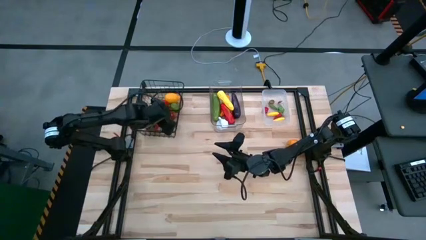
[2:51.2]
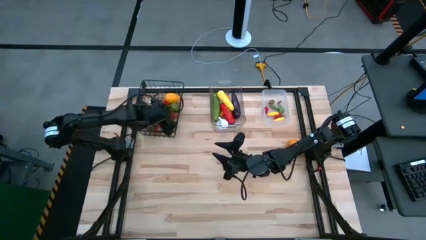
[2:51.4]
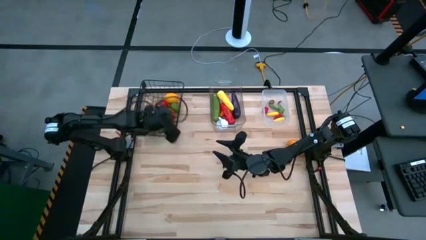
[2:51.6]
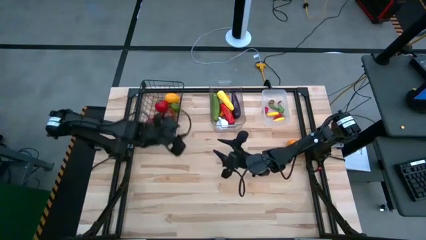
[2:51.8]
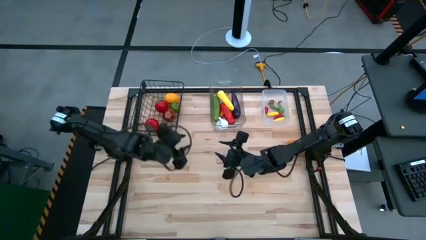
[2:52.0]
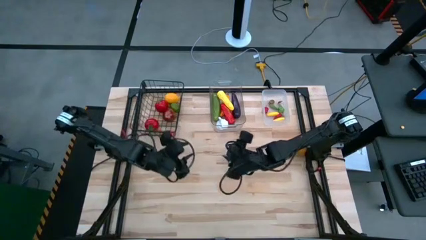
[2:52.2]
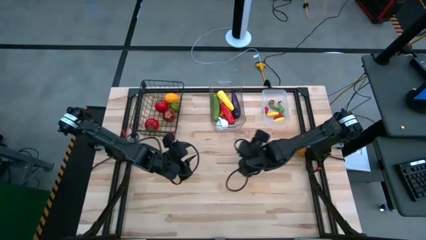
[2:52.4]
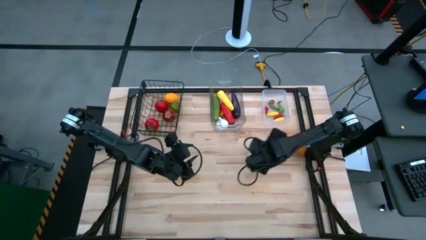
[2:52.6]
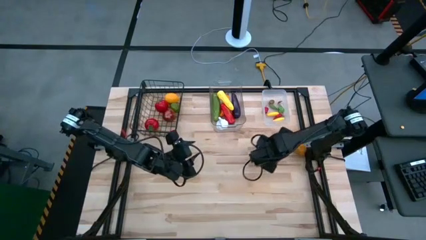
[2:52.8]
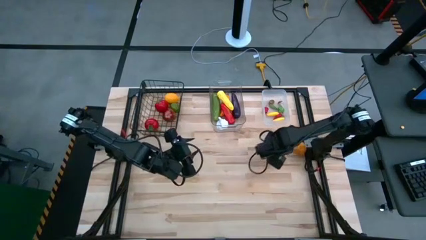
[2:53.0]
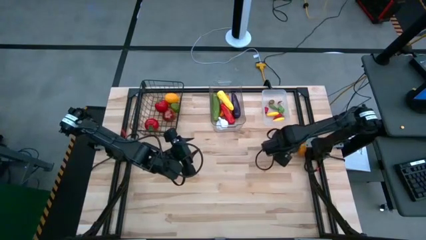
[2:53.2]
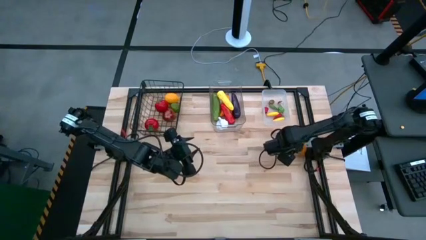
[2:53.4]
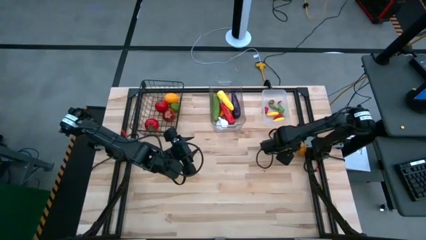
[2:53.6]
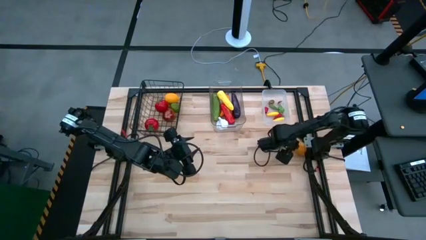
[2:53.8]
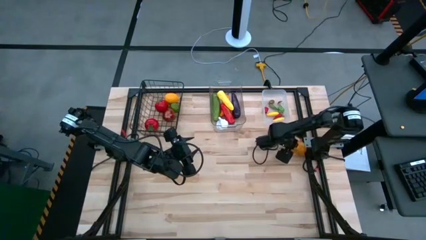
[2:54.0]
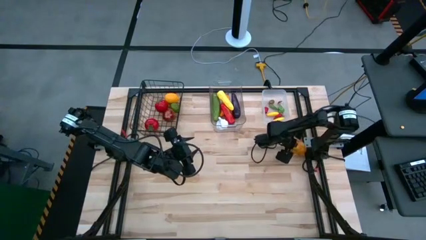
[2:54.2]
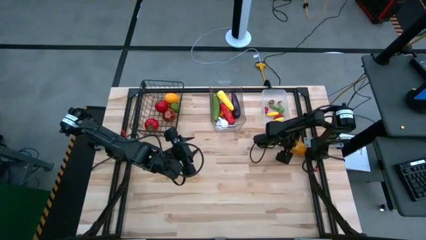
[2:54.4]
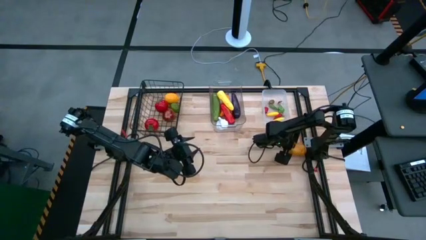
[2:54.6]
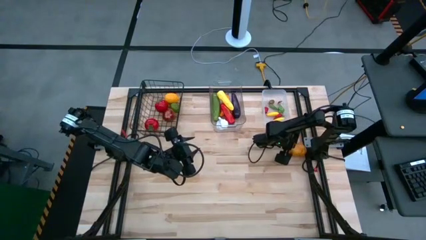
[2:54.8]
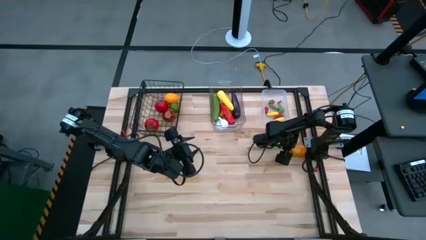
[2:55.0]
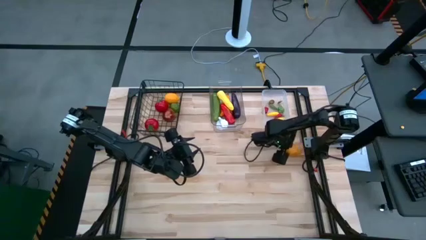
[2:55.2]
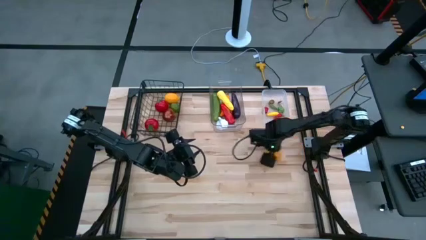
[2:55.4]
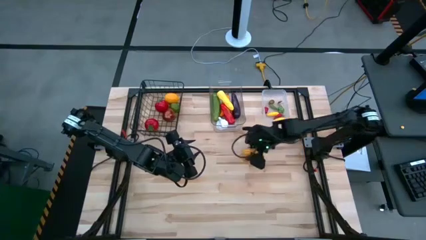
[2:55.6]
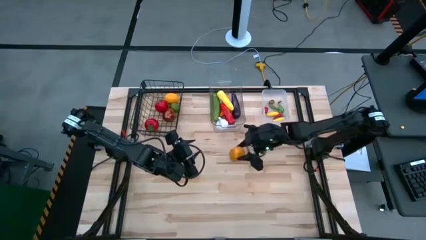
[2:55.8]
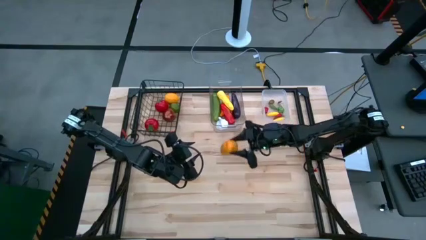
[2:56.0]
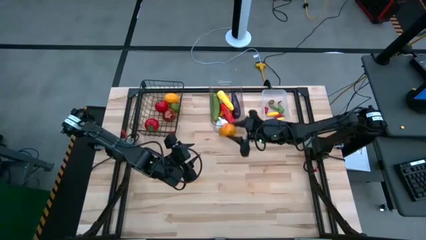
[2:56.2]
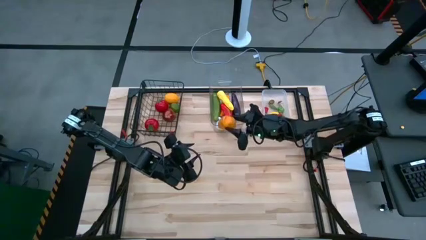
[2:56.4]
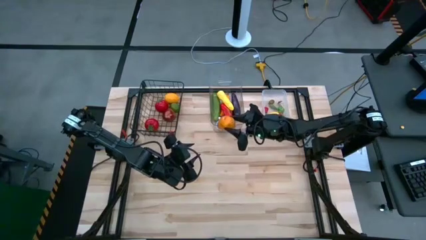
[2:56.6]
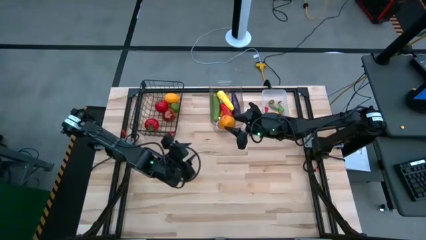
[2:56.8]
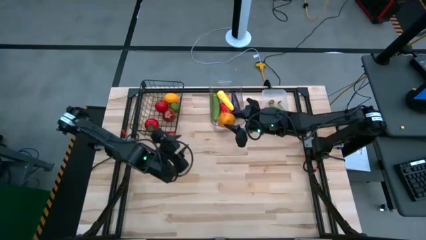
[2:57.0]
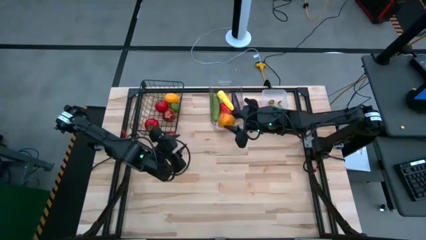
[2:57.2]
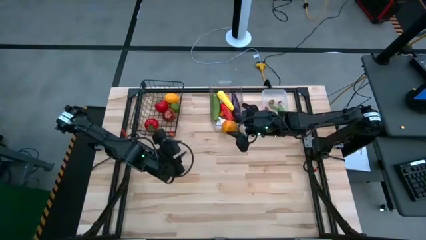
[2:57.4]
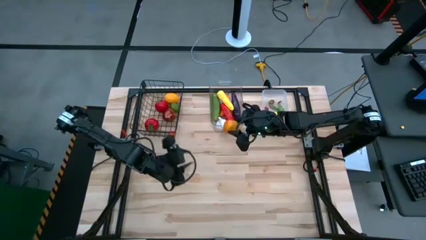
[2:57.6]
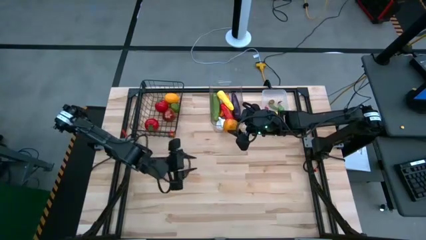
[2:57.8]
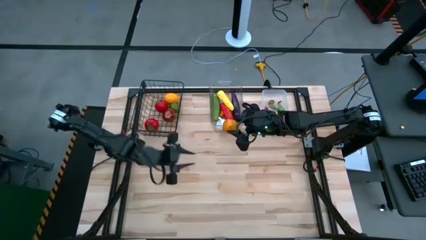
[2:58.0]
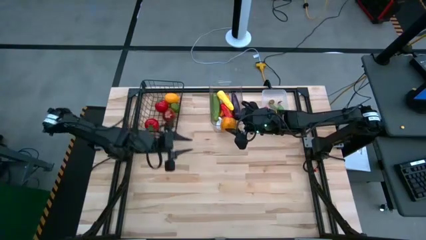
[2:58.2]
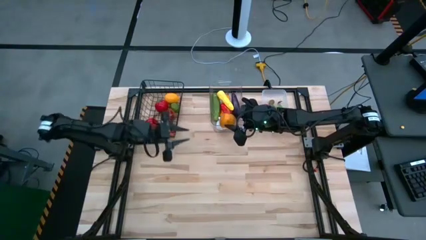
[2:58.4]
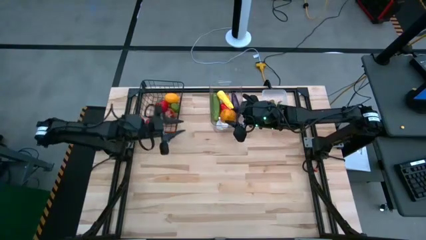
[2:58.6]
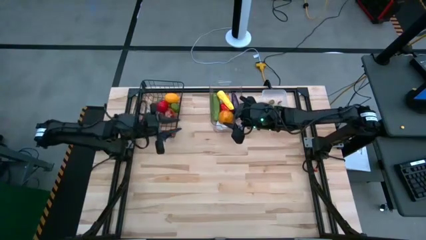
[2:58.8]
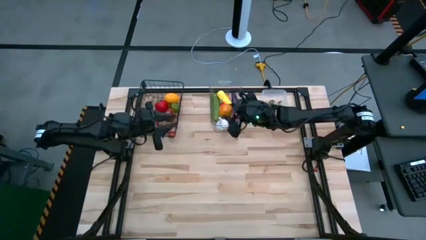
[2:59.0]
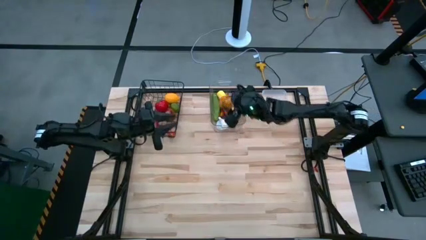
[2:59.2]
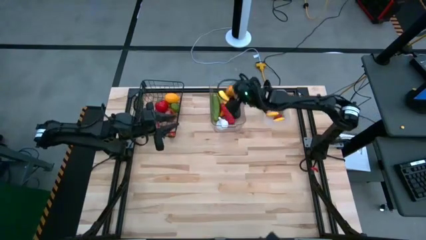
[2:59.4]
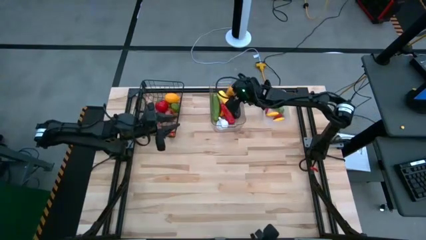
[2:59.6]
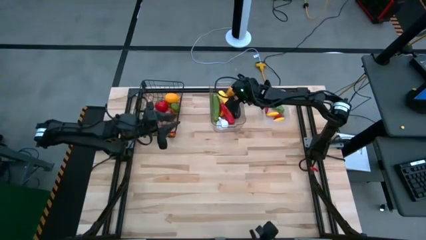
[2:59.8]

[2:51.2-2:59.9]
Task: Sort produce into baskets
Put the brown potato into the left transparent bin

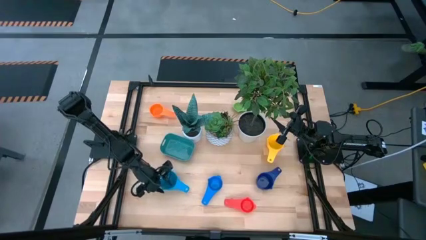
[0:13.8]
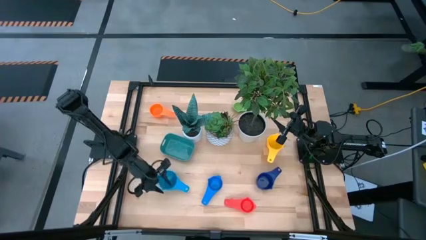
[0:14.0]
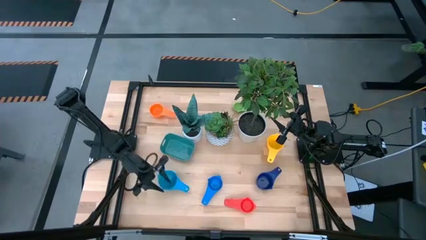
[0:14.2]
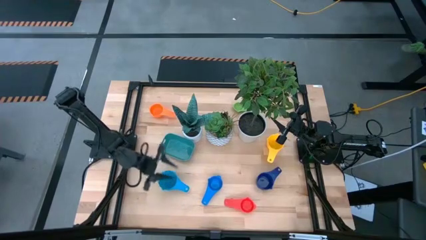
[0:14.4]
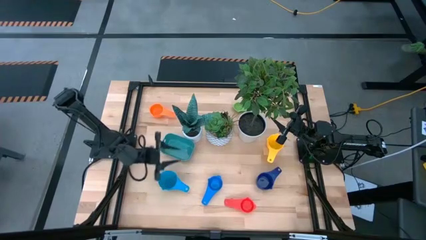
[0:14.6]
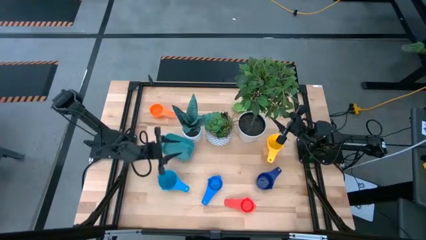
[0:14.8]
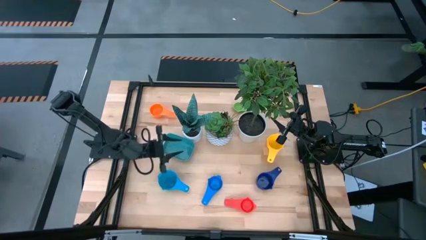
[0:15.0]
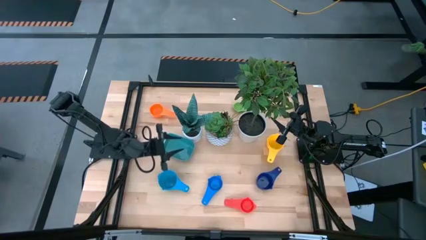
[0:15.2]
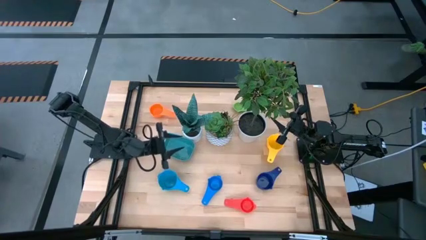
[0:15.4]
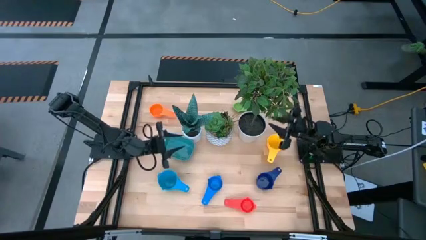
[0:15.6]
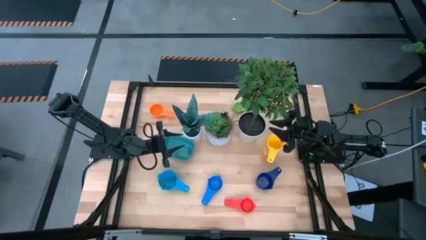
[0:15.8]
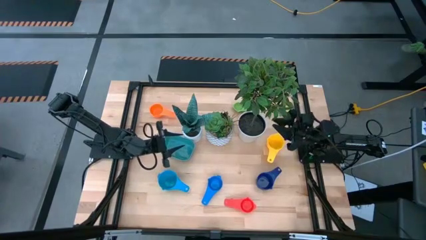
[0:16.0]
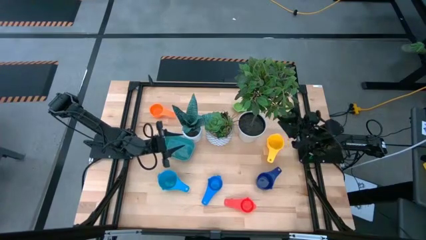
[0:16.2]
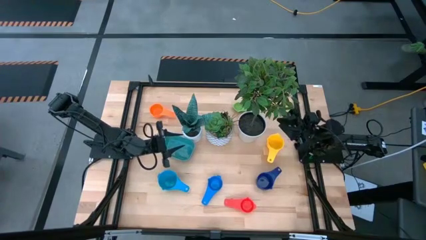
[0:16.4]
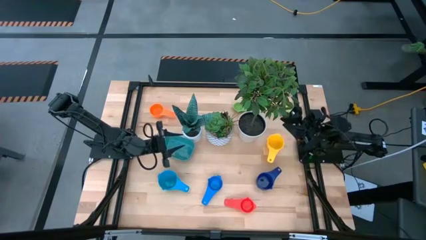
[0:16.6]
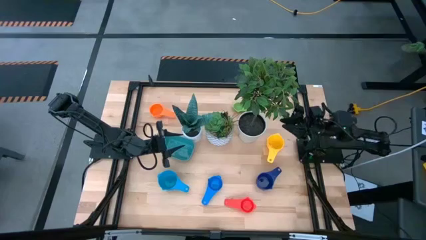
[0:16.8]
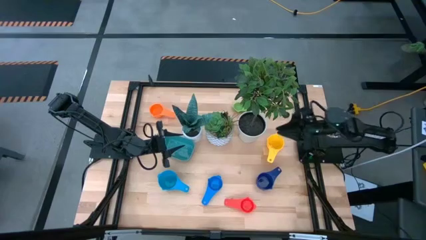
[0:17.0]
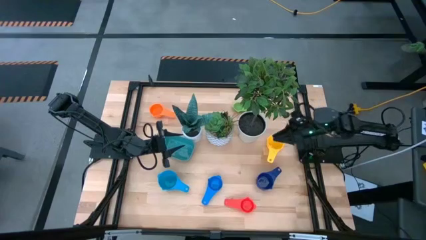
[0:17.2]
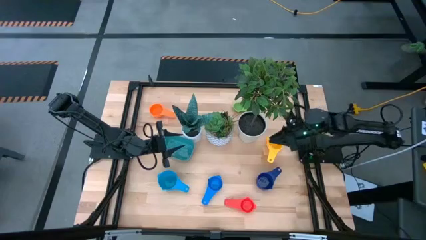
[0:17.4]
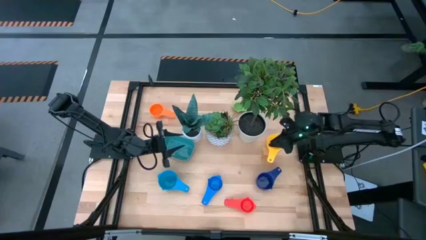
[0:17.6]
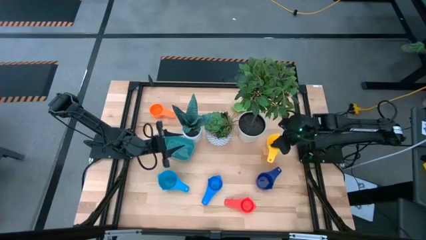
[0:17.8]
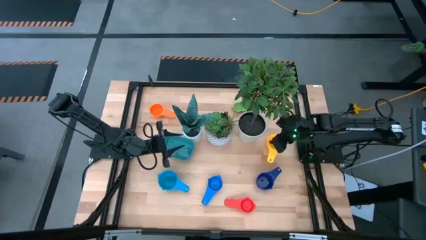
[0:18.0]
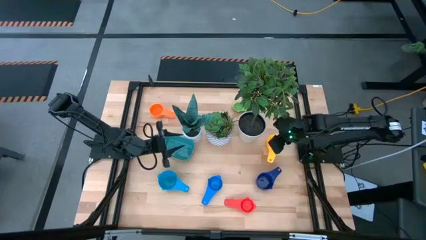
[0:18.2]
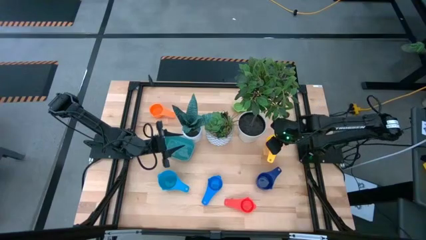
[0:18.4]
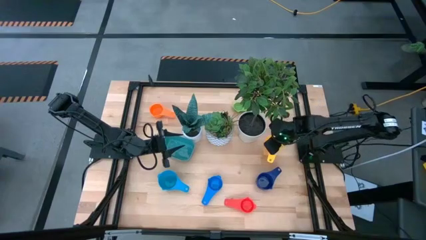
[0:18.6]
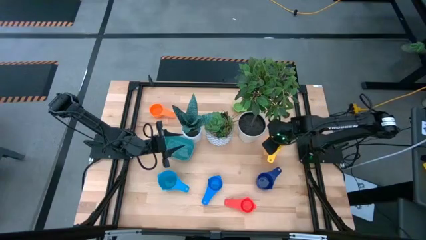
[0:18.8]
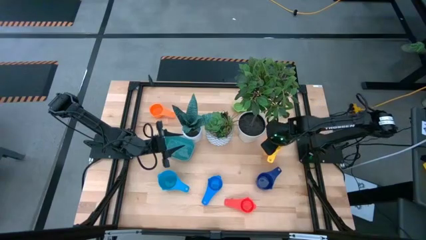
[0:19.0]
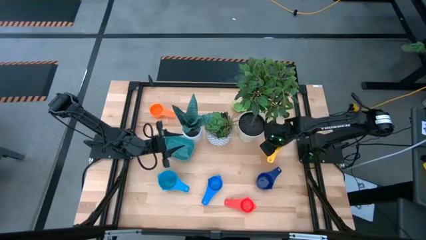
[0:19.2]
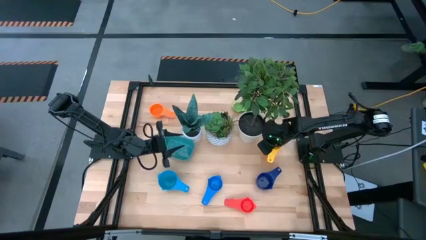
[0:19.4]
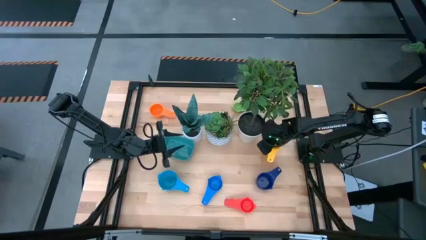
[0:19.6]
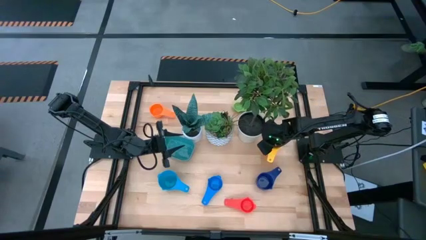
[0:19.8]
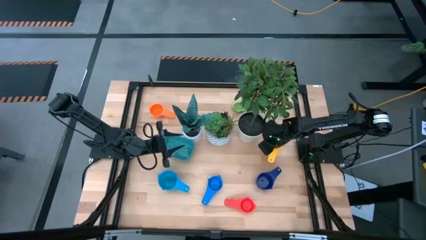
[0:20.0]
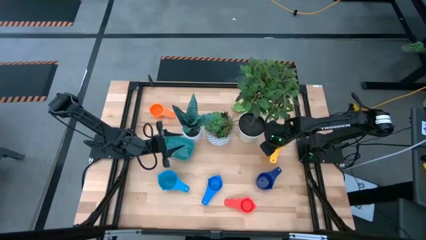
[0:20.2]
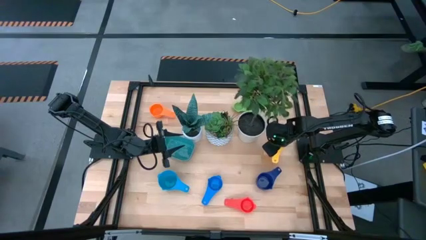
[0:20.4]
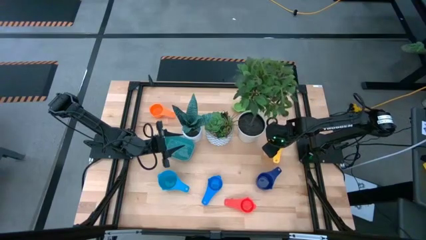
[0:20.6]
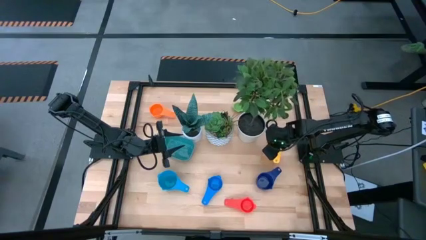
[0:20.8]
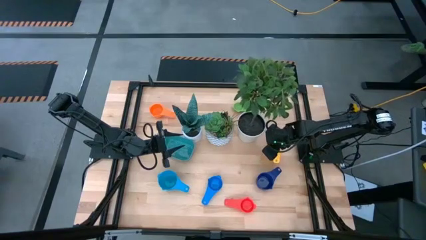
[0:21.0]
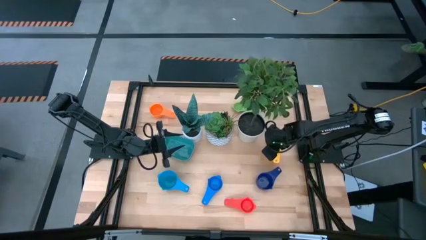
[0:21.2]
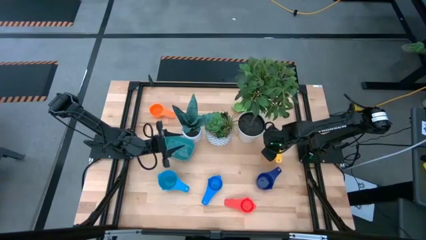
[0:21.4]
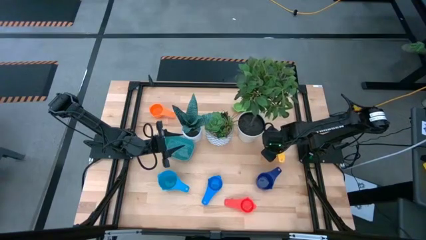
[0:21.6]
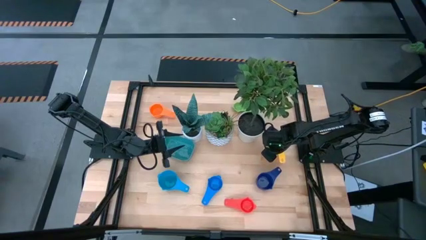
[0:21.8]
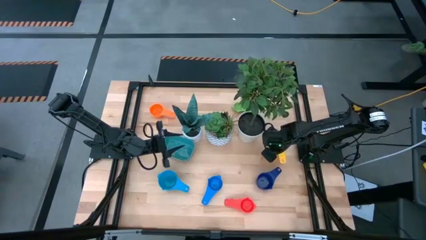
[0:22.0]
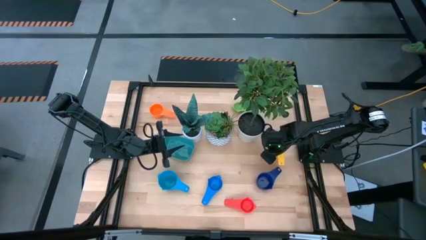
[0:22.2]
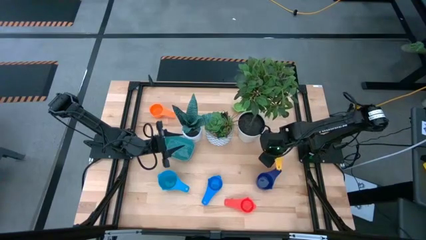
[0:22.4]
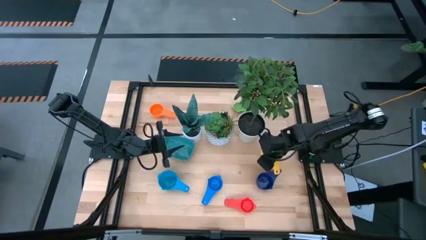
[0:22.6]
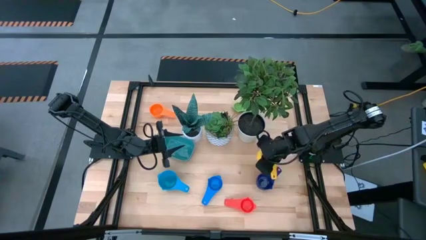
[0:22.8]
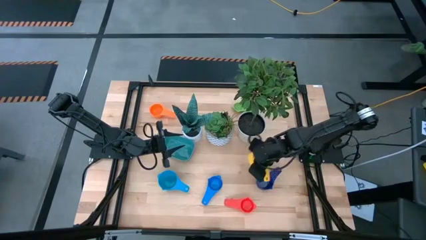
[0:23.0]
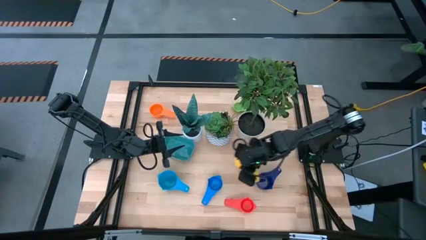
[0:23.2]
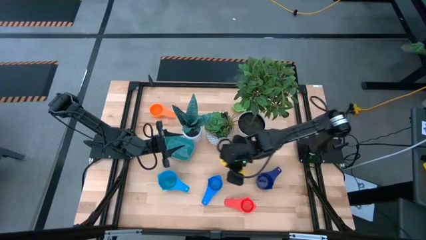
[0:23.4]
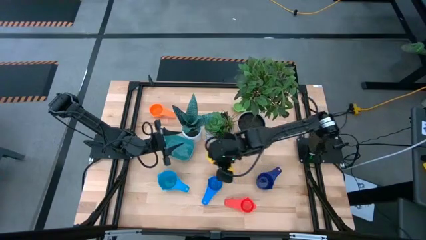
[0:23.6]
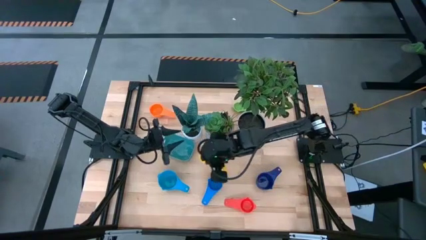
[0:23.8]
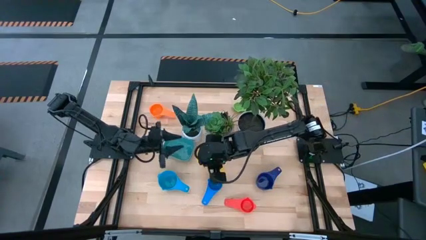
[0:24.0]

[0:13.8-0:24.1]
Task: Nest measuring cups in basket
Stack the yellow measuring cup into the light blue measuring cup
